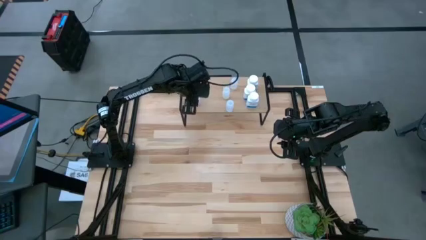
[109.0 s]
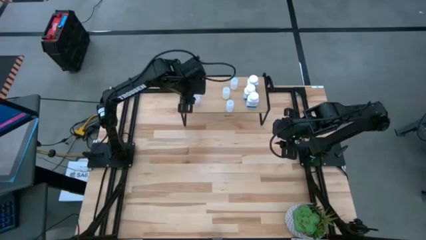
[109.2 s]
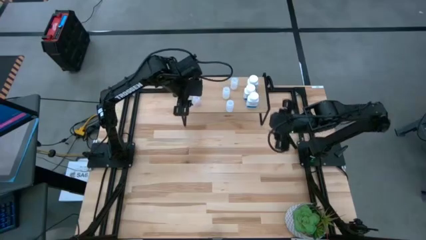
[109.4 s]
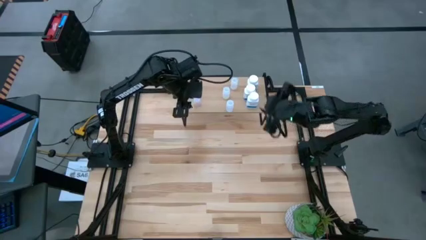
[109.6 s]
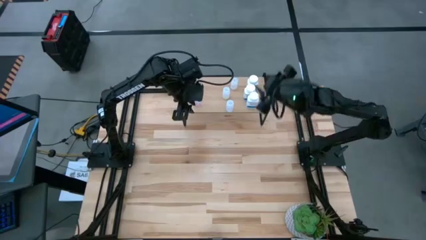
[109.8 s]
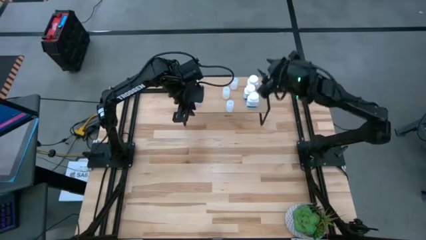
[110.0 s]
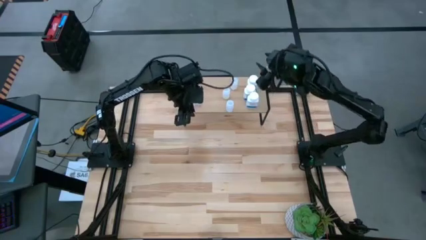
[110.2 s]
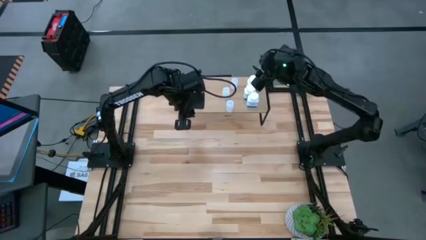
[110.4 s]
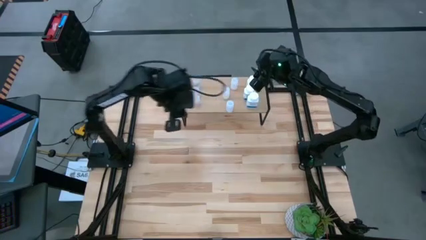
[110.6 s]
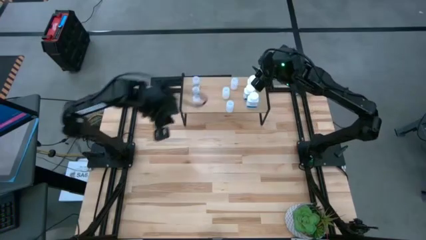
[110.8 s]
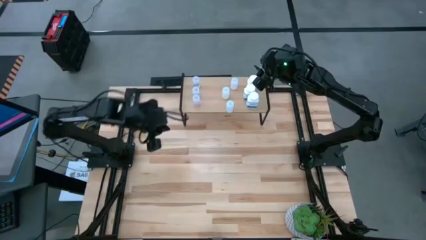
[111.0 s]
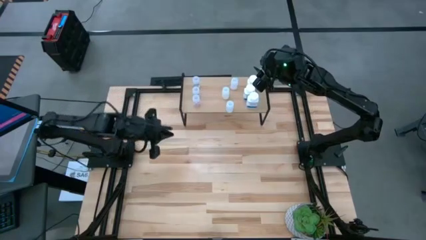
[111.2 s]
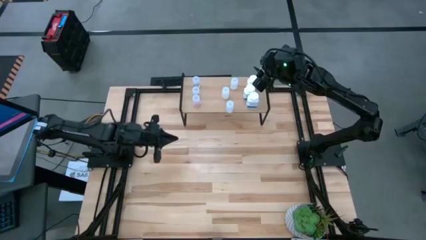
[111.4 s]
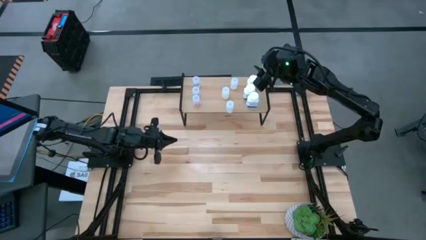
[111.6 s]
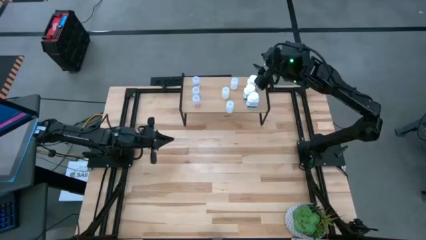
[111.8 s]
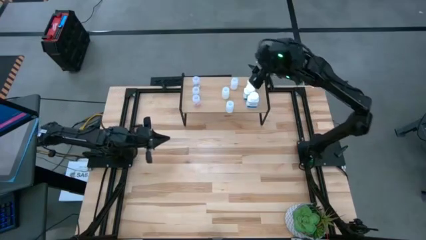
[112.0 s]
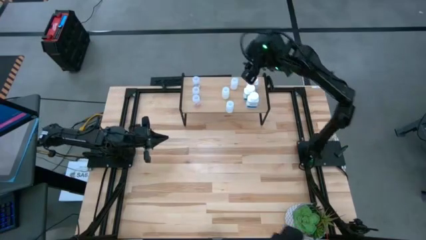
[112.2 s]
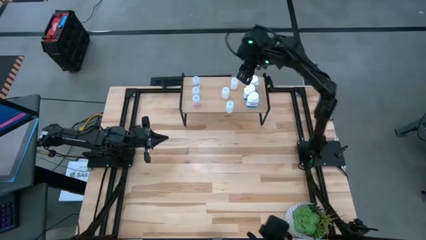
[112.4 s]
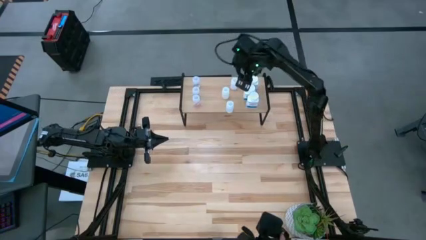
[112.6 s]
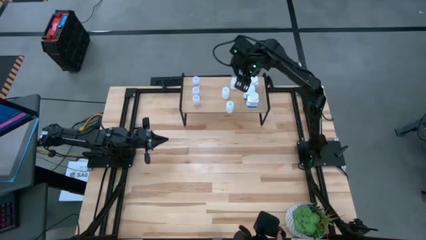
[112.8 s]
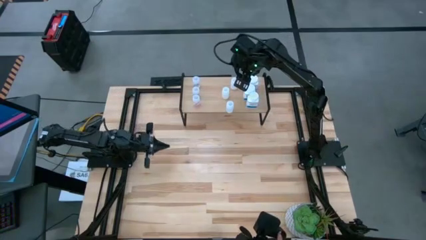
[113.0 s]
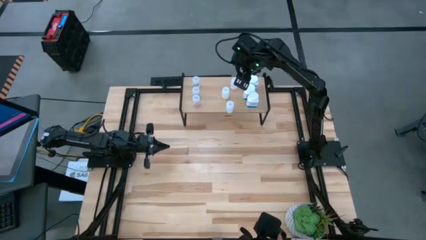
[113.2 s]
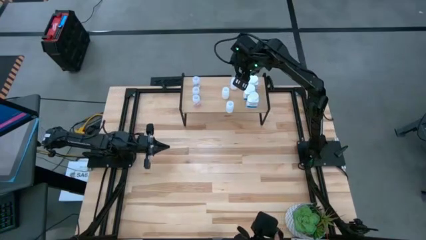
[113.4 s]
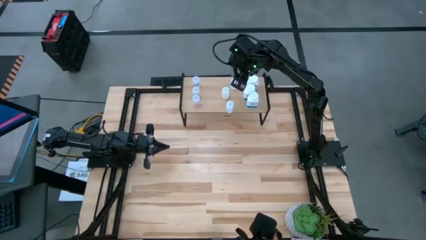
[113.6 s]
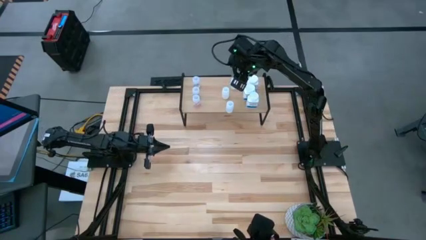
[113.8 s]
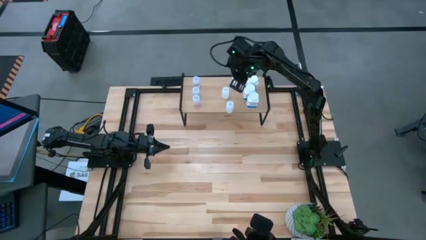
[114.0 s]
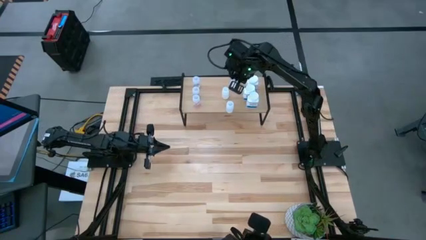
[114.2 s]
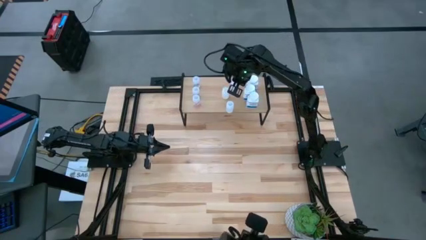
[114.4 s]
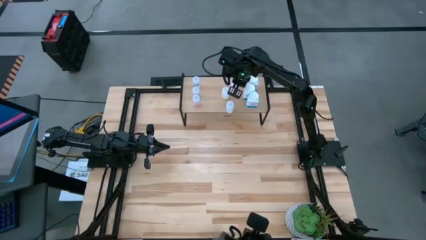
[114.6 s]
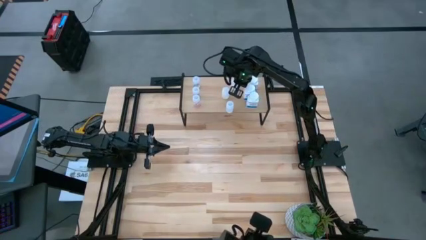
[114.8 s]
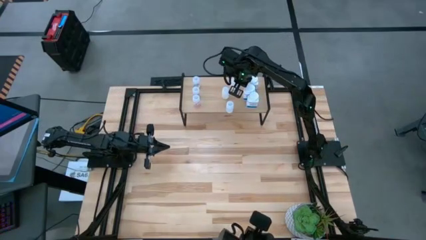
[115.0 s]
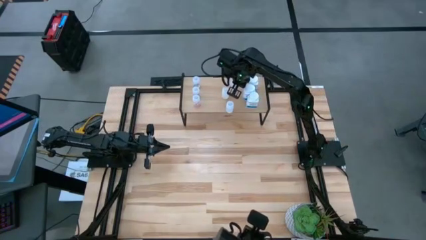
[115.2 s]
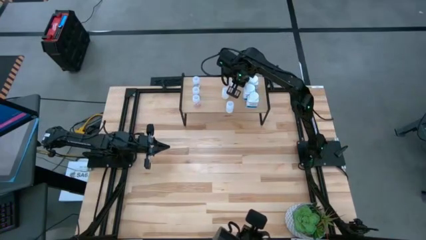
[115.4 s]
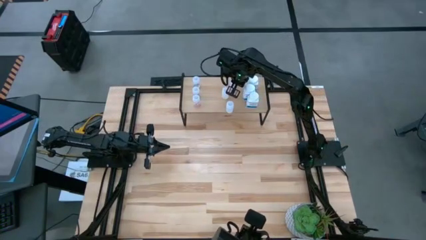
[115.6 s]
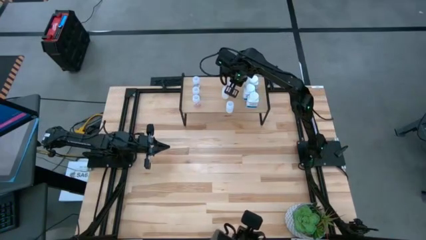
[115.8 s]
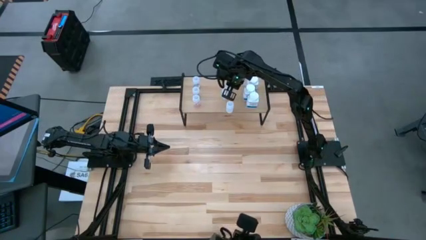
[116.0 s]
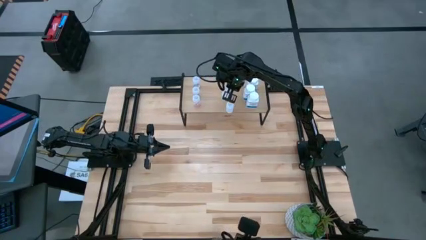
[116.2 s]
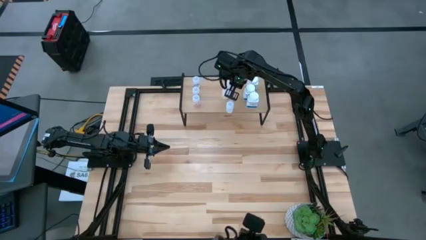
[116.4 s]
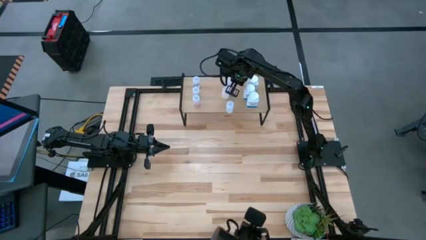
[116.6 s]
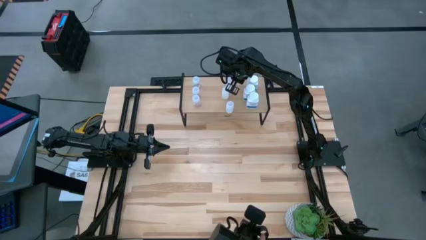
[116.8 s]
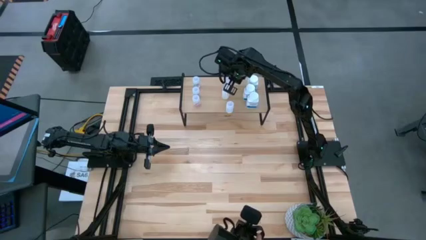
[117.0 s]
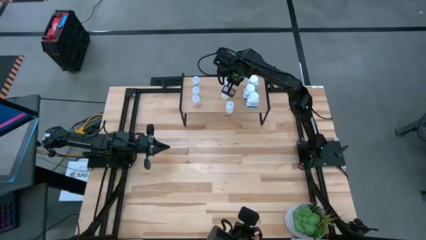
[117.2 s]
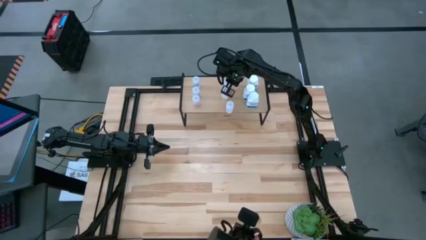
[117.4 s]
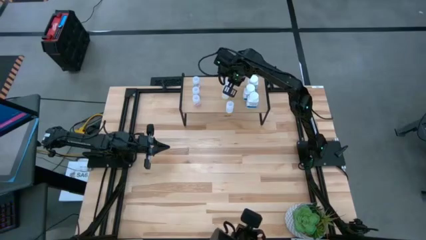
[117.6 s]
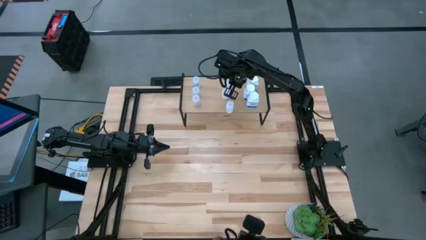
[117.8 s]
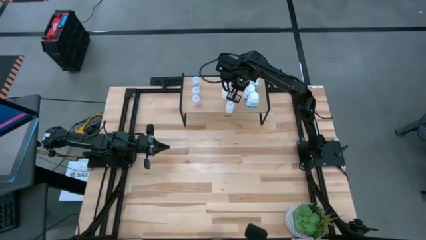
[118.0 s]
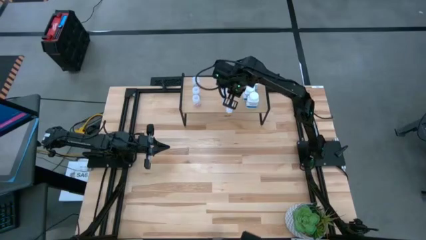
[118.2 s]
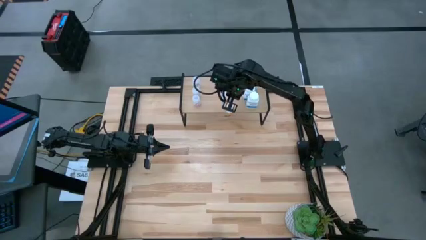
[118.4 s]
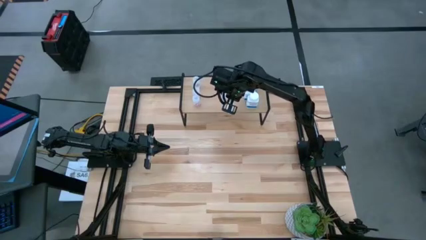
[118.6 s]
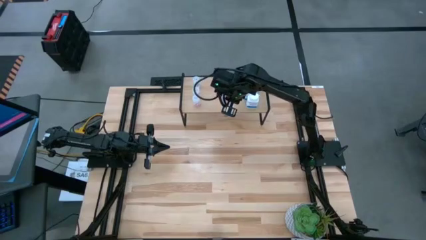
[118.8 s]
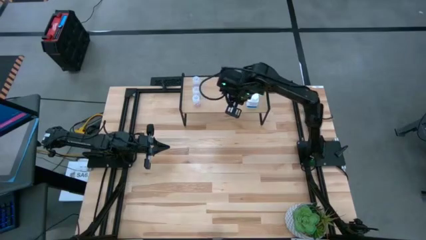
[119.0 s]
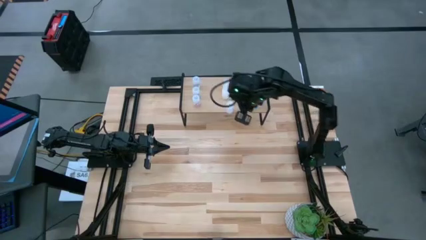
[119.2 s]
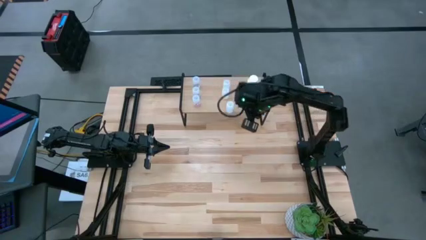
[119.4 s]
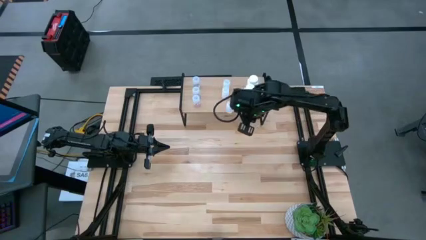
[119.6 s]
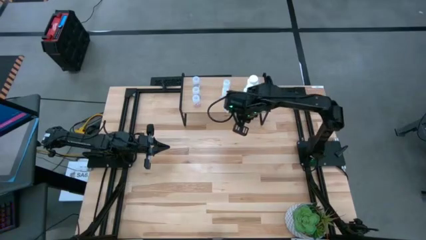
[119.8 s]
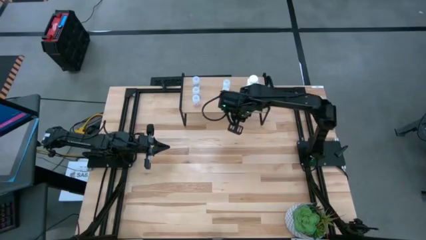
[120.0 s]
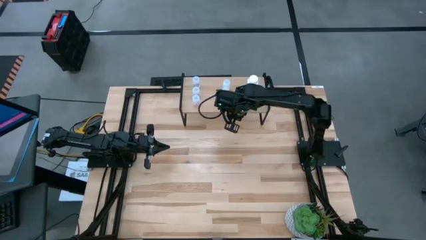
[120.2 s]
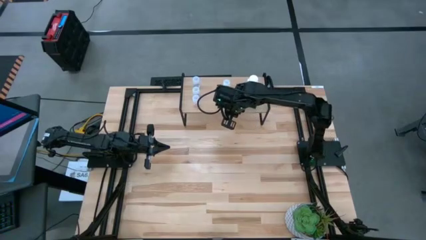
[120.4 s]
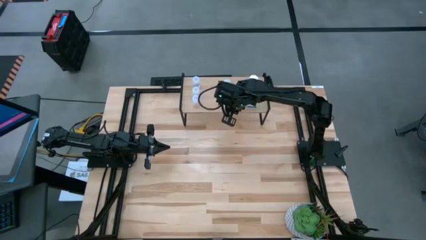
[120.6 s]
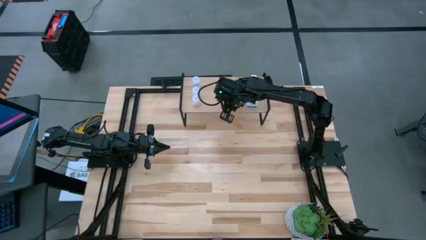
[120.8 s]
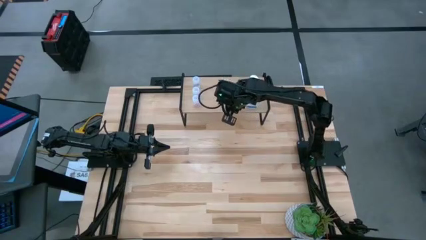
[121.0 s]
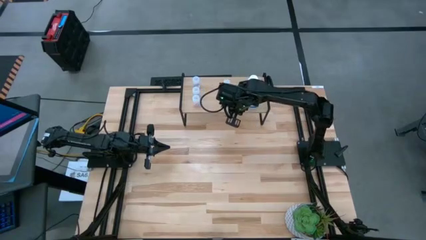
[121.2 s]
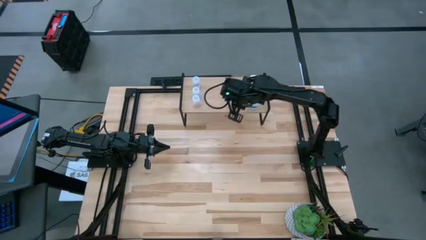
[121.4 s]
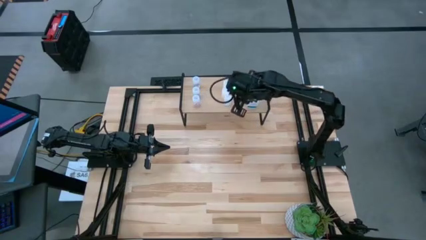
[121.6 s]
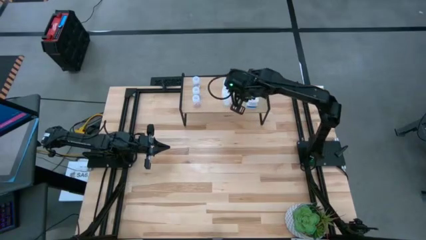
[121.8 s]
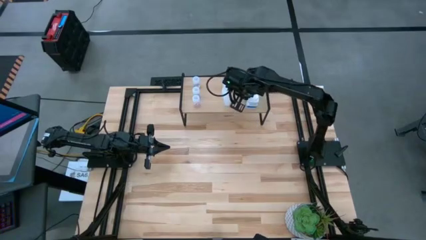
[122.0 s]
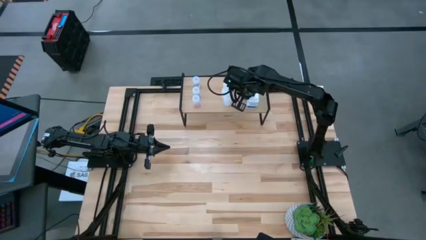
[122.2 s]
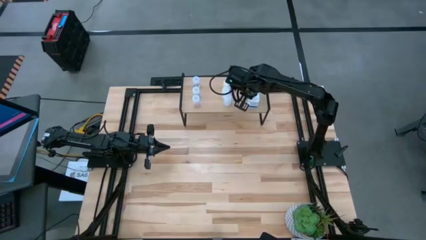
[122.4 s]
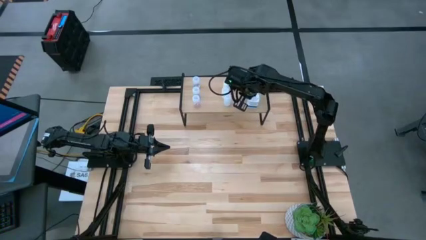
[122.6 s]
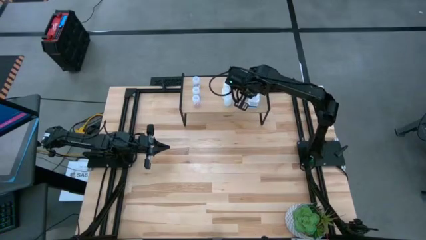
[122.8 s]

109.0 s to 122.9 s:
Task: Pick and place medicine bottles onto shelf by color
Adjust the small white pill bottles on the shelf
